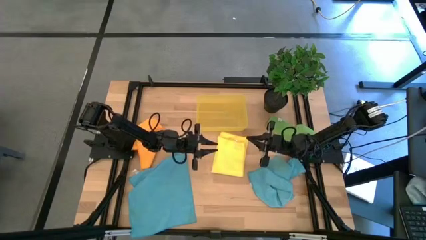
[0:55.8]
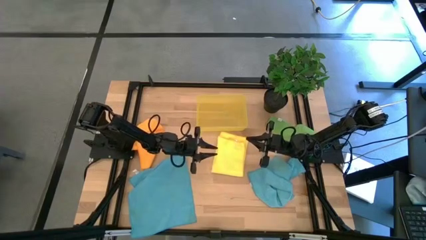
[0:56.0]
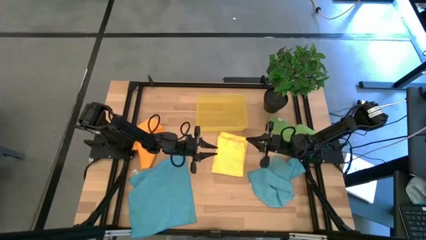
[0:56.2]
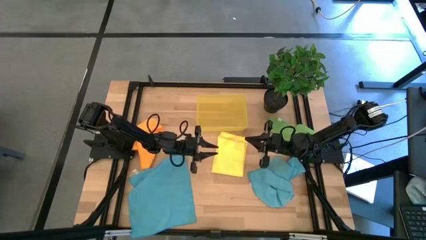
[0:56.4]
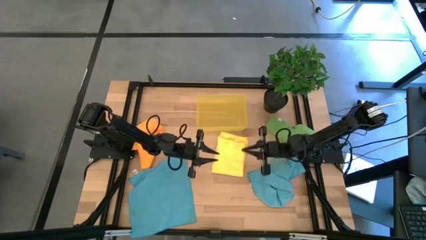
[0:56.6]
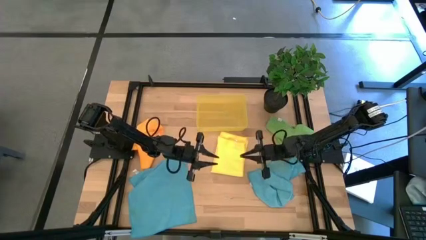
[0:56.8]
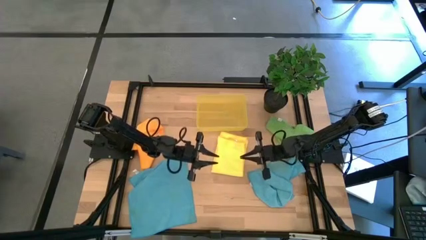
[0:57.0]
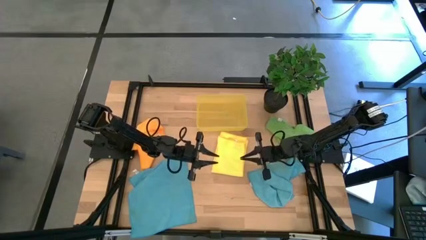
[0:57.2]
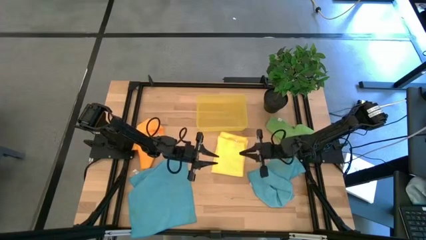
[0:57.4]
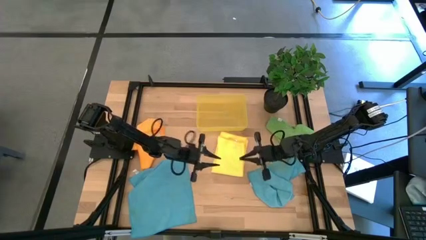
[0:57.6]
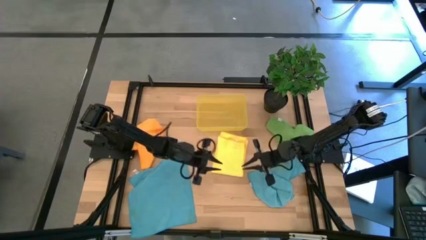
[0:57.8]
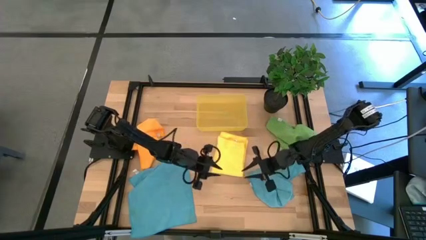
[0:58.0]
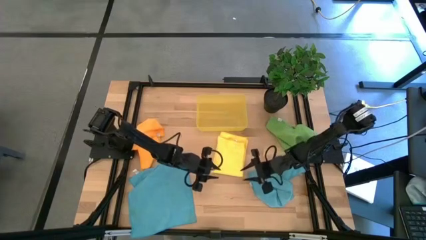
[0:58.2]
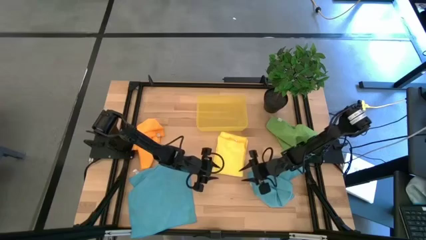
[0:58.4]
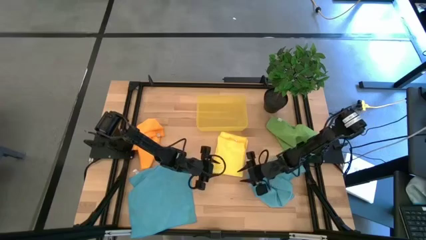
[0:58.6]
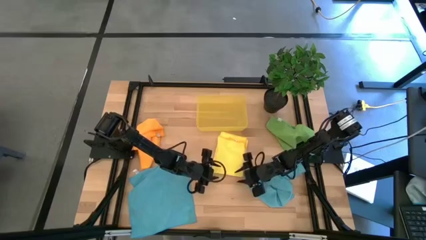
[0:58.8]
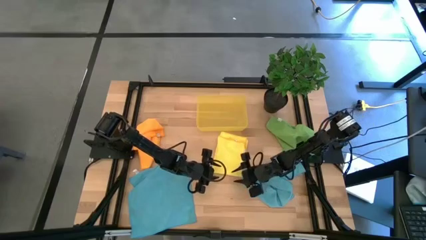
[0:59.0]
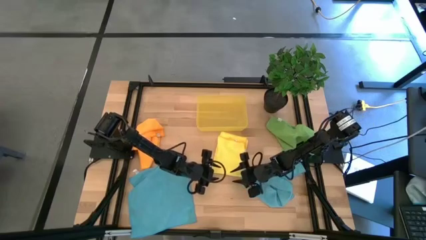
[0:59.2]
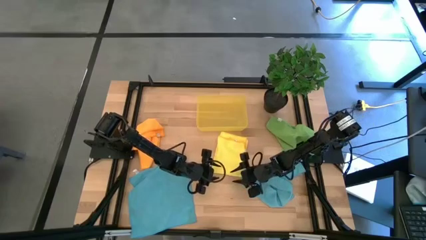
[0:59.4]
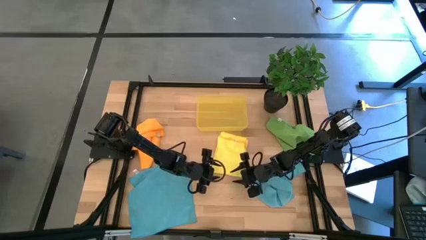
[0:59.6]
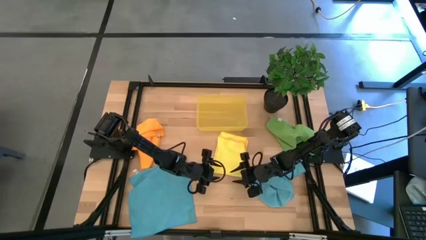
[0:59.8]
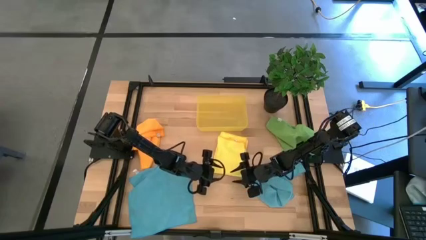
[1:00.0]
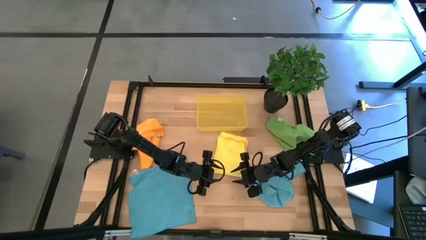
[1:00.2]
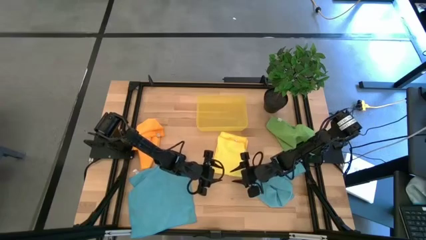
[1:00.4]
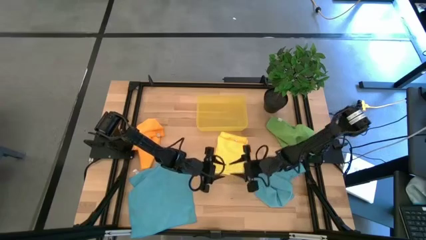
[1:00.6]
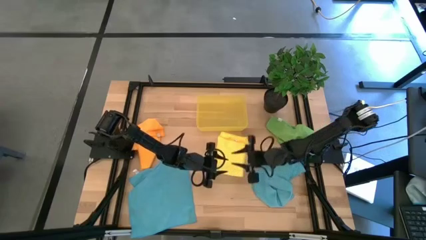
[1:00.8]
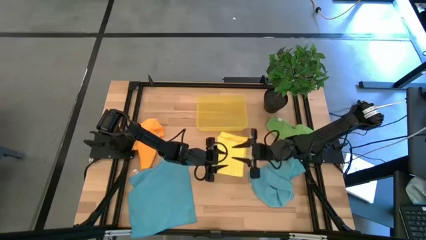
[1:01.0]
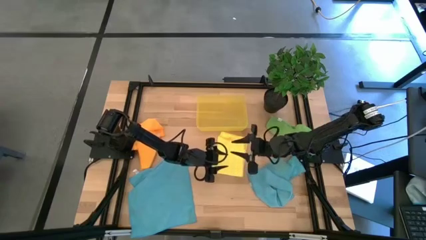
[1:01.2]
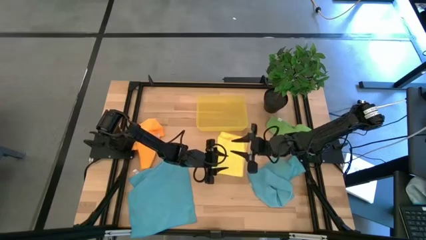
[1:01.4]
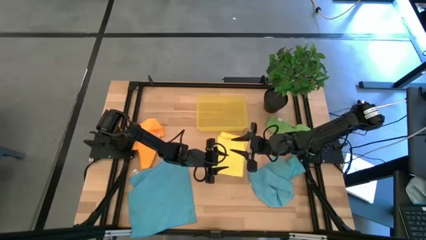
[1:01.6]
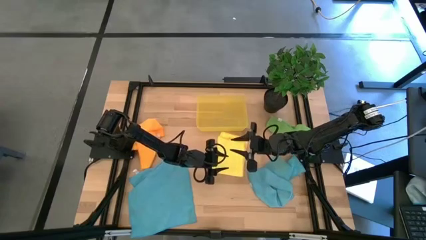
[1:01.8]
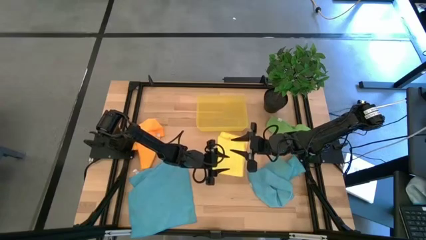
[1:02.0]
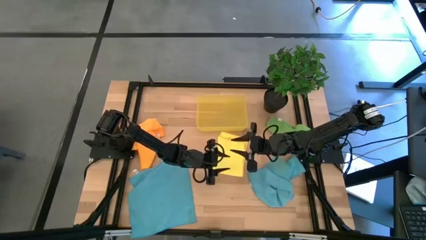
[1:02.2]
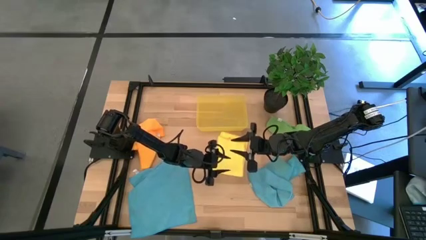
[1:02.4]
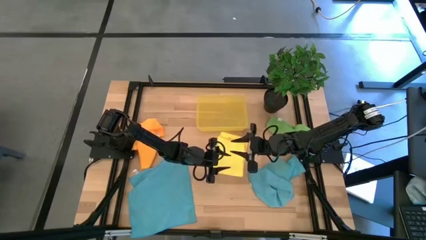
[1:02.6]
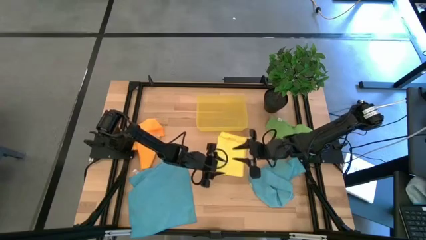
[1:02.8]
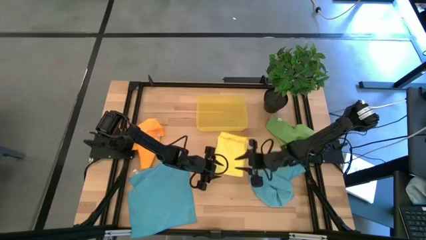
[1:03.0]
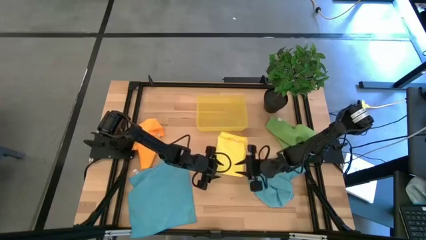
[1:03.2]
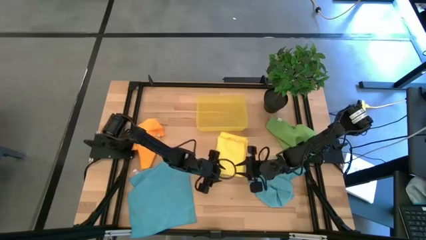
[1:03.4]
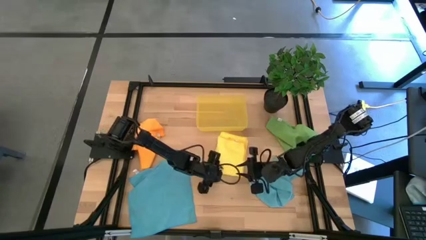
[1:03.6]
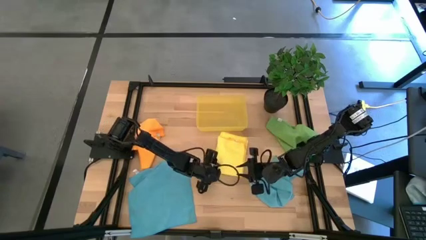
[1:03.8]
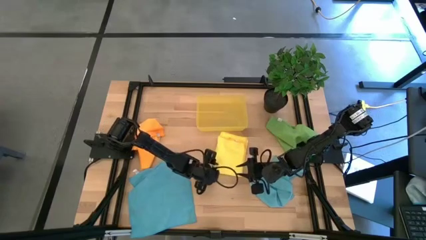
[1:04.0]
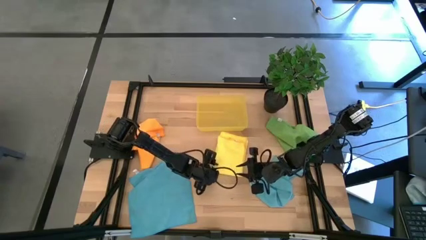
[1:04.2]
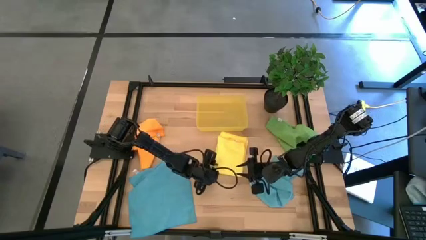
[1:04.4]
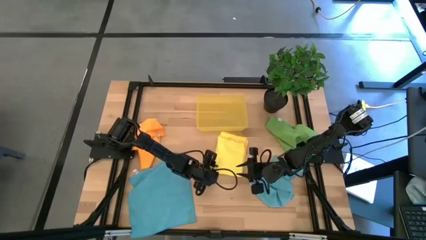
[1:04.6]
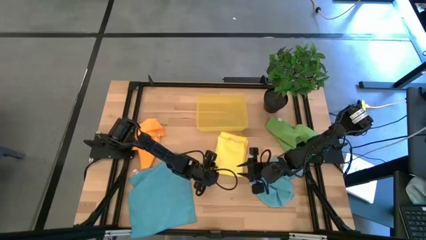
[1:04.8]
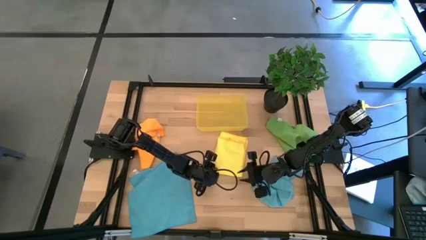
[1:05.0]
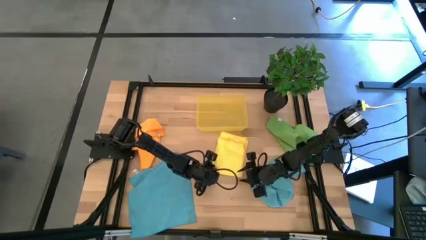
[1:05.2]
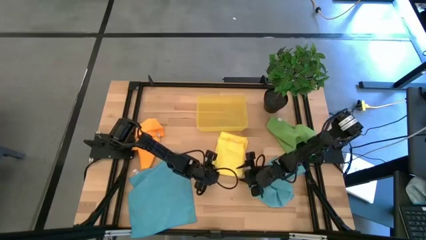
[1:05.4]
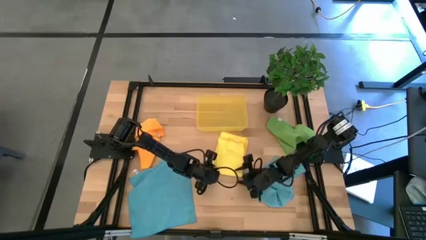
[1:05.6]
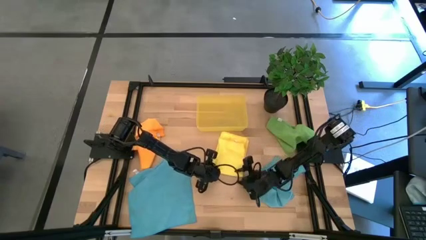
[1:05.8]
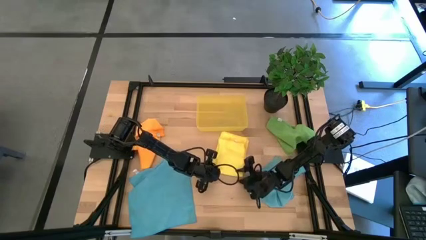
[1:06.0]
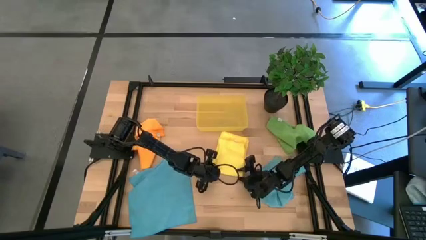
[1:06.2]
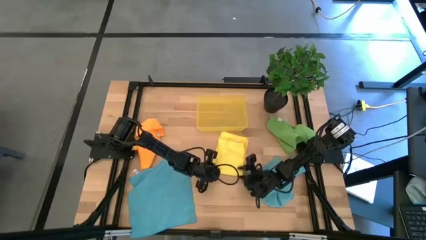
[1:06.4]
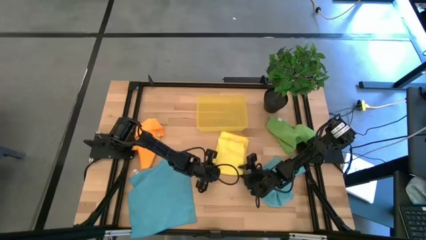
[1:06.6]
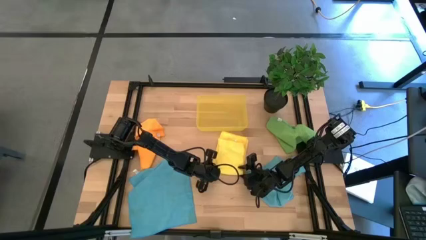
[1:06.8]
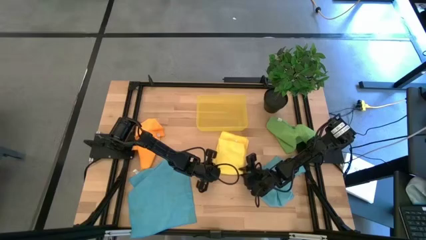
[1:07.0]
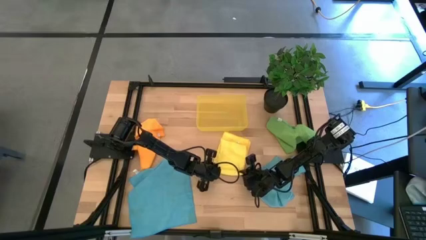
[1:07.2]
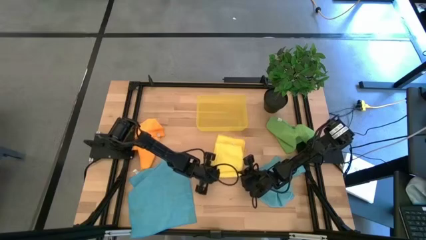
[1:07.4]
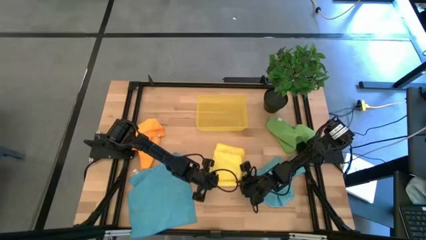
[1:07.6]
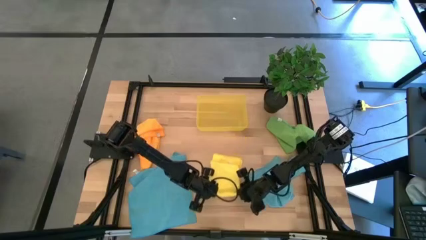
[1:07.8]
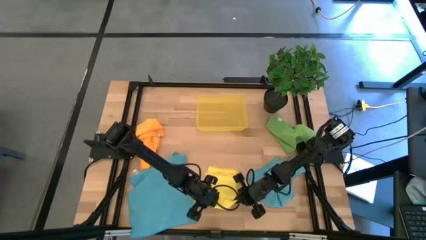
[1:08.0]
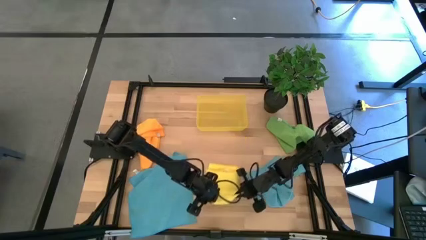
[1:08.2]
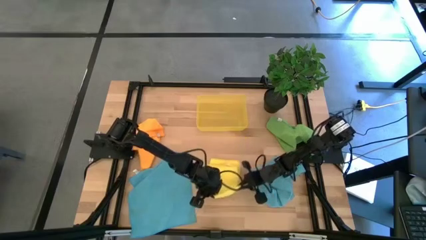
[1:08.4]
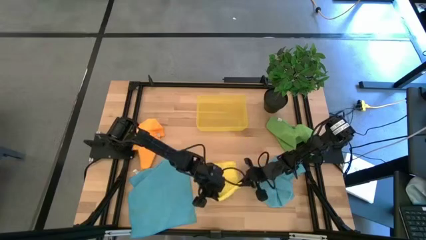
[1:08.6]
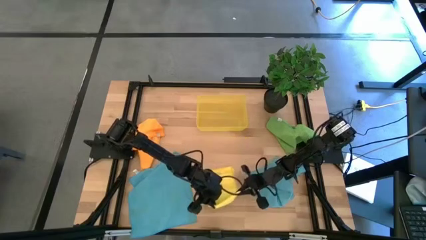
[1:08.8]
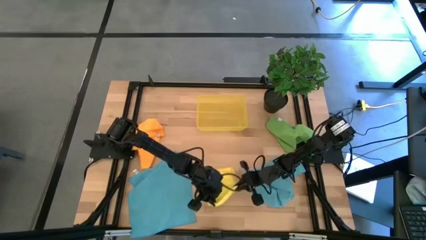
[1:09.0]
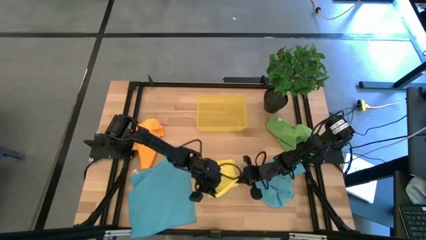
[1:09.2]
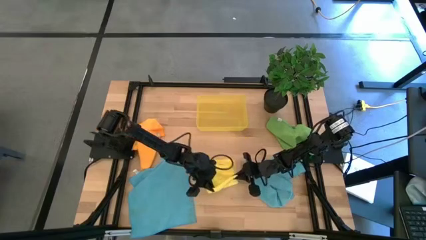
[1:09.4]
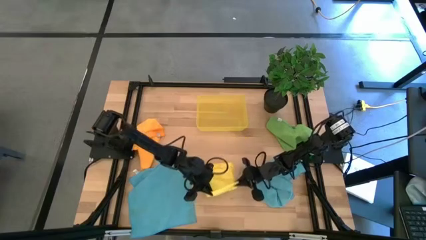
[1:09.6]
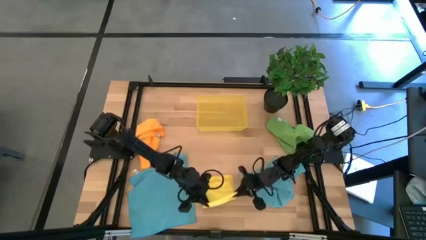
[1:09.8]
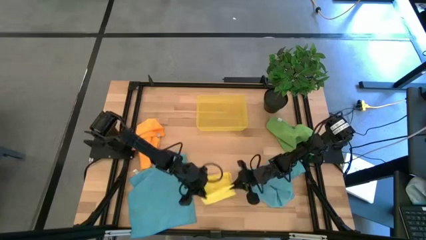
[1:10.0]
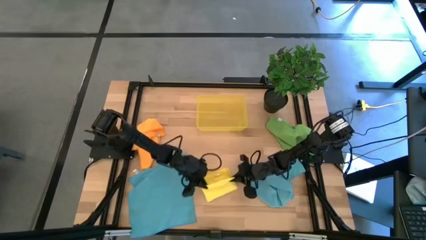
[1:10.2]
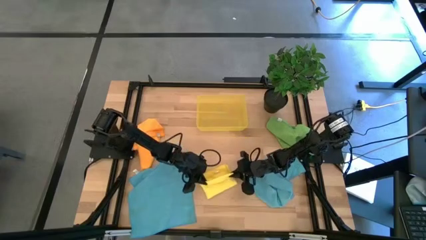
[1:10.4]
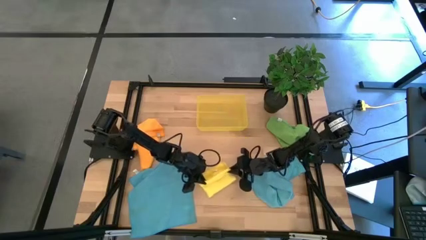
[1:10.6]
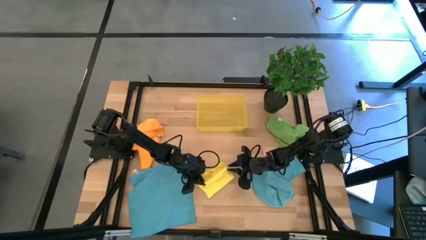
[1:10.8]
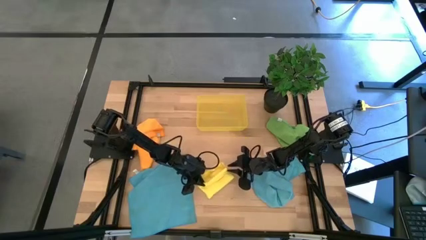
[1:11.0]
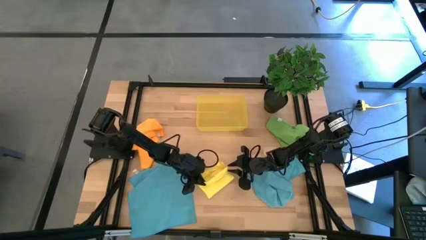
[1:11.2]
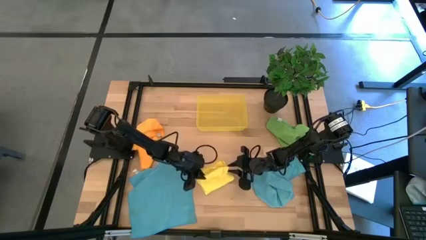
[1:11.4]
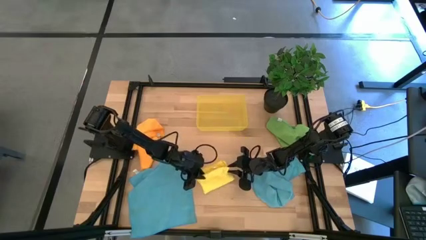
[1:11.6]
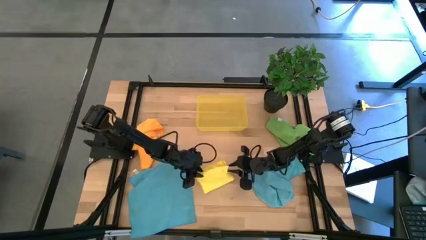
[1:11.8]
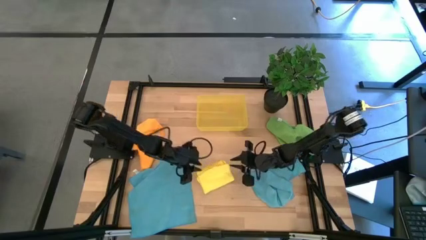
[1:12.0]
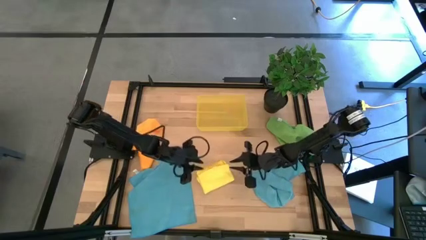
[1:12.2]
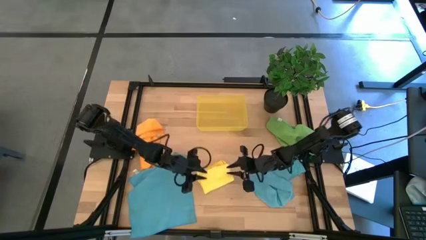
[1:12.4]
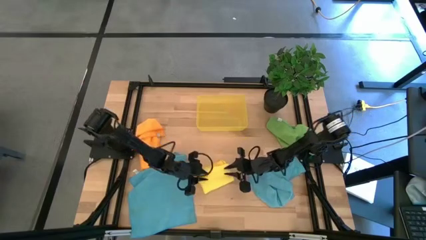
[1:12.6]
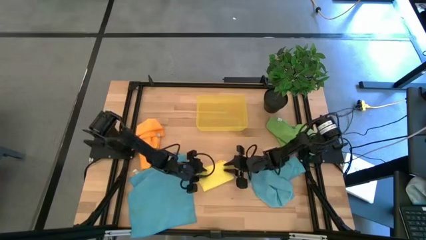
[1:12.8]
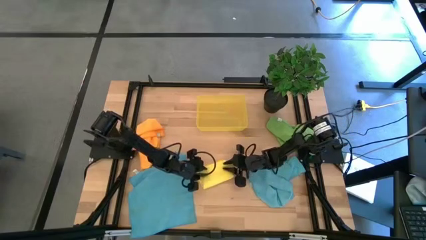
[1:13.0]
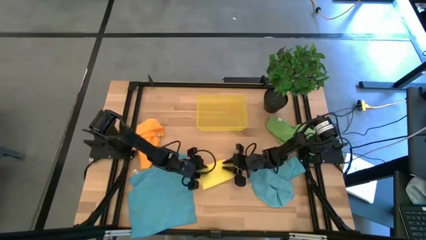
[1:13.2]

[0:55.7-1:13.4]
Task: Fold microfiber towels
Fold the yellow microfiber towel
